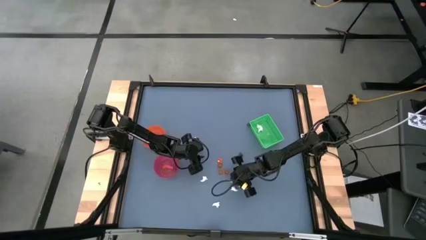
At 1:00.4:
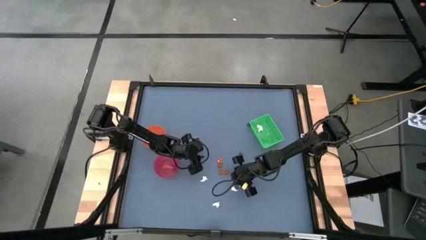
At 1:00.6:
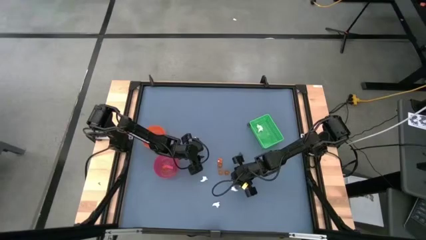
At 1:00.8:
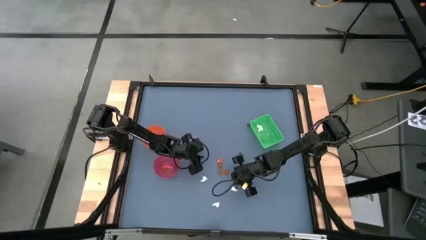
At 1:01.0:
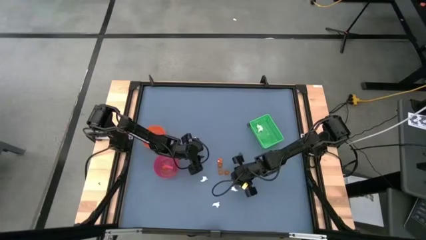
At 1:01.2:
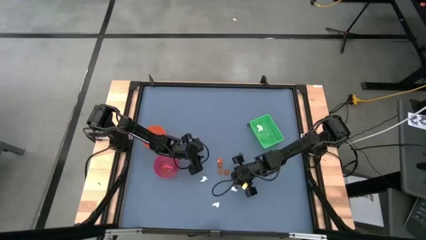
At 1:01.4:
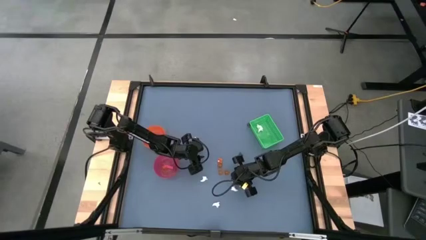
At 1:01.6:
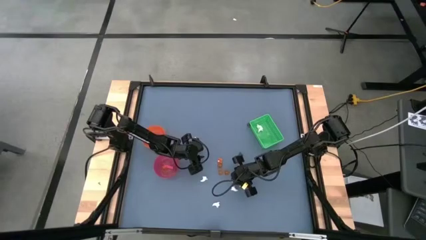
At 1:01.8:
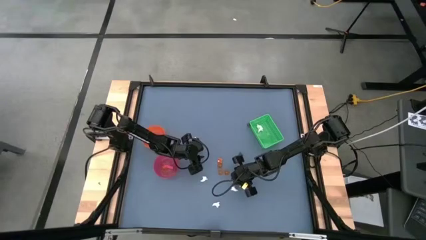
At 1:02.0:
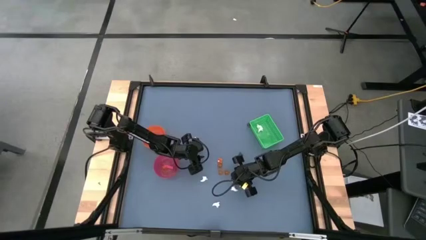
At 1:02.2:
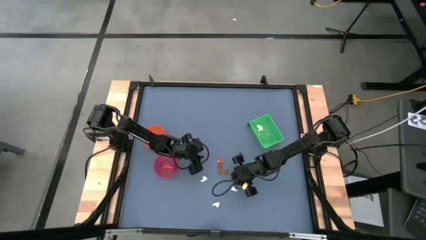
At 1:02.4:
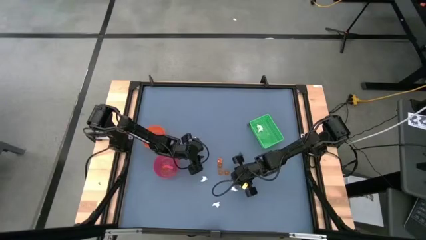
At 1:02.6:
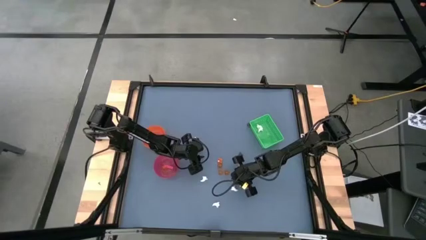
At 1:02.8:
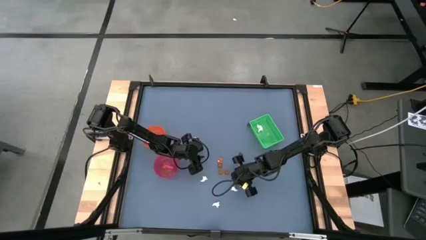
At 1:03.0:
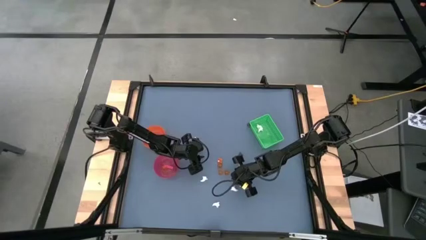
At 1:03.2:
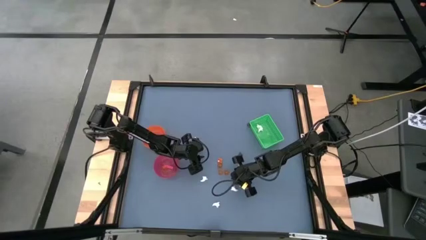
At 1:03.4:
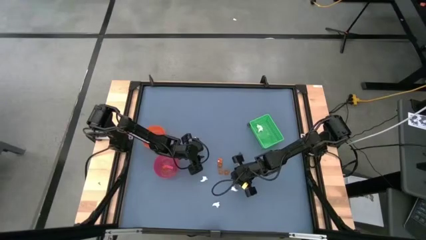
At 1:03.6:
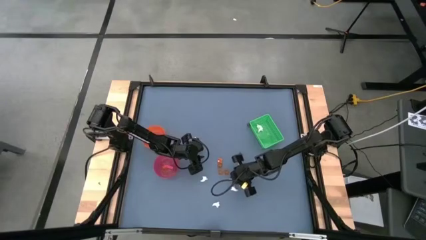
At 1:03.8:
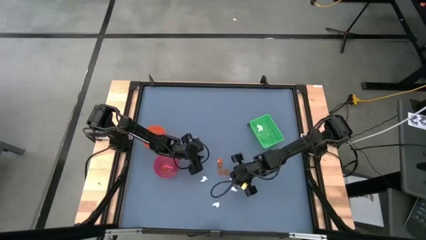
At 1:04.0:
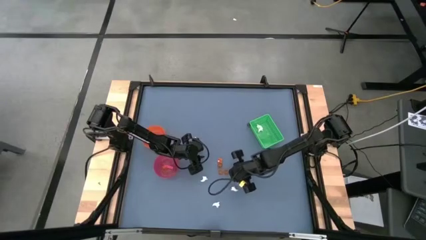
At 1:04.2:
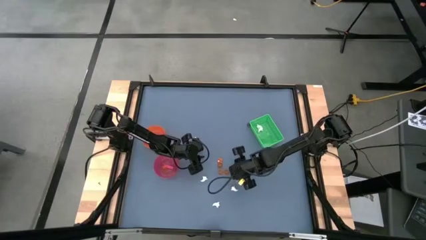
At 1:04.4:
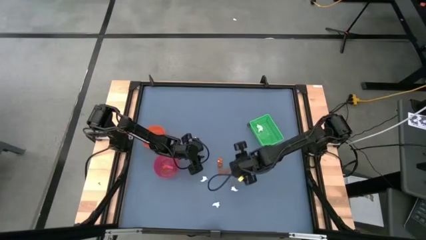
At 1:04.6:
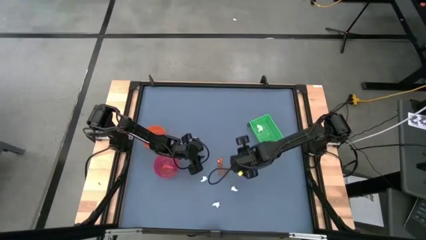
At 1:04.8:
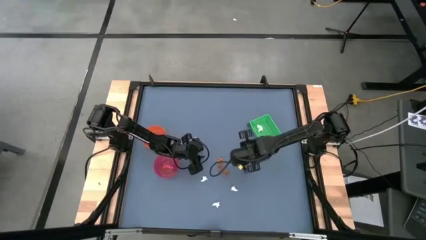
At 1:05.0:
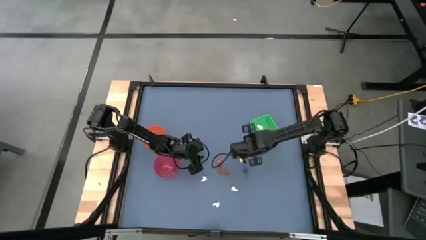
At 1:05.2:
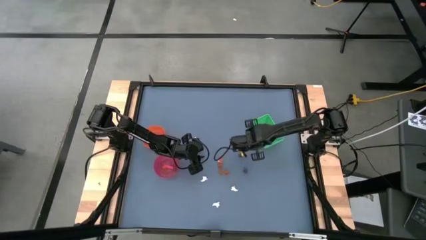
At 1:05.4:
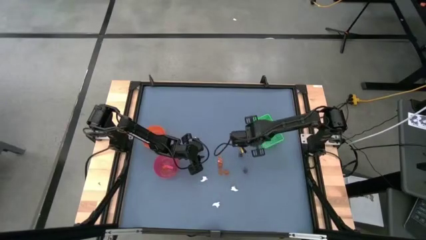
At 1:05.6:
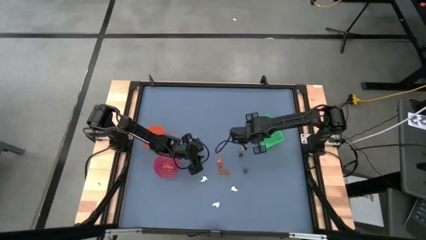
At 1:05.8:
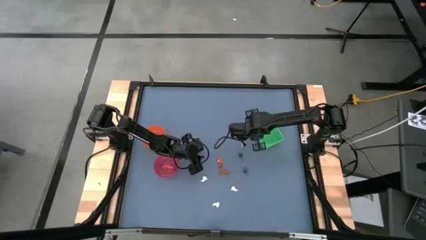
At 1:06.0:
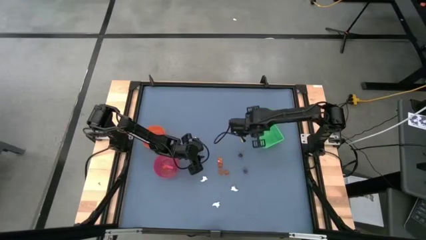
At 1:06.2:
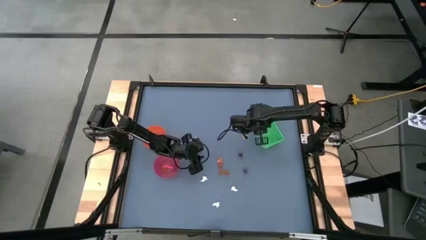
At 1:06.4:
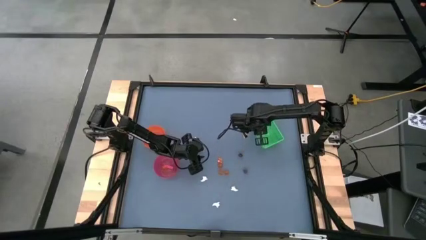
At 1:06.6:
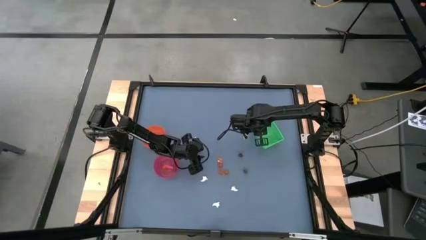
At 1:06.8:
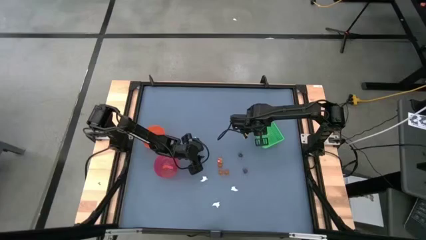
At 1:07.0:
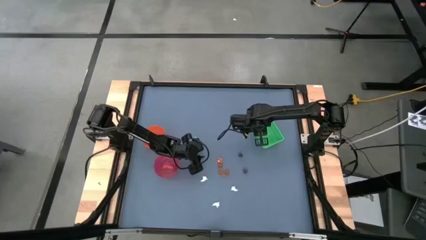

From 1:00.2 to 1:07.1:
Task: Sort Halloween decoration
Put the white ghost toy into the green bin

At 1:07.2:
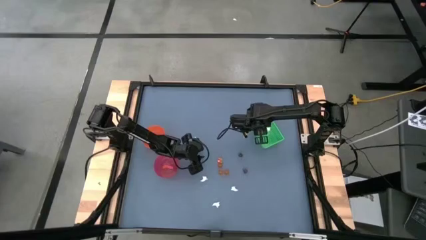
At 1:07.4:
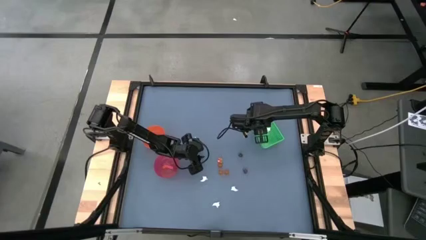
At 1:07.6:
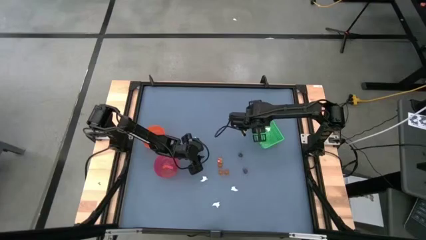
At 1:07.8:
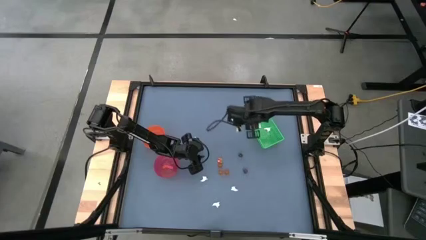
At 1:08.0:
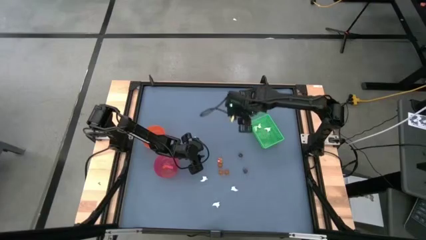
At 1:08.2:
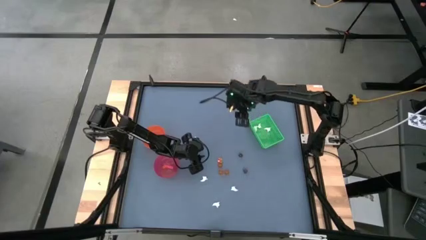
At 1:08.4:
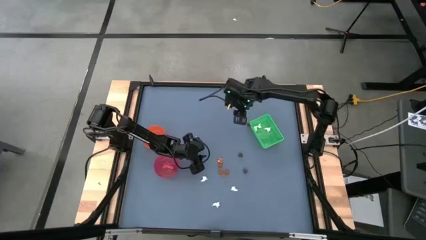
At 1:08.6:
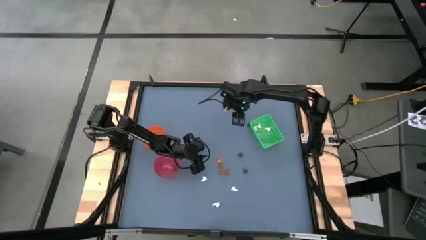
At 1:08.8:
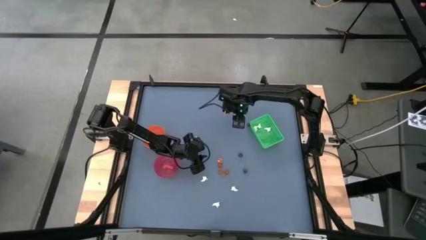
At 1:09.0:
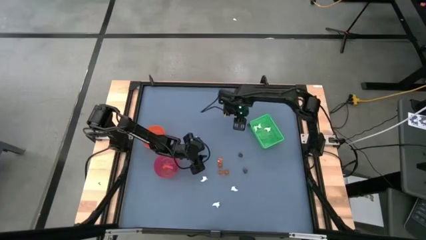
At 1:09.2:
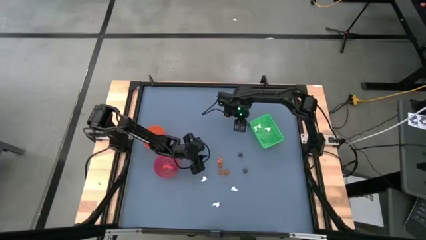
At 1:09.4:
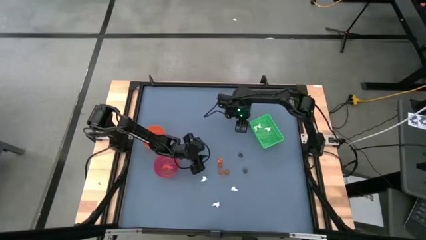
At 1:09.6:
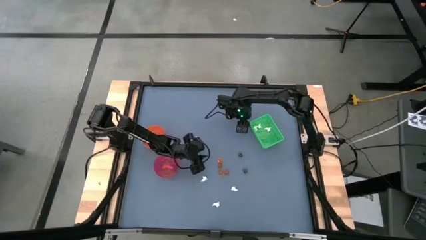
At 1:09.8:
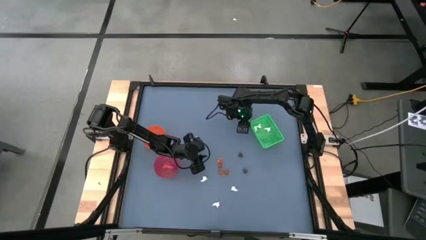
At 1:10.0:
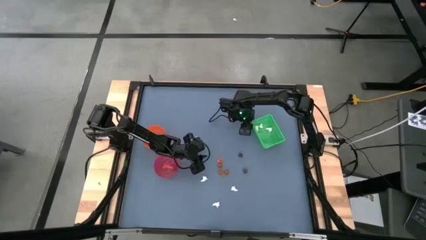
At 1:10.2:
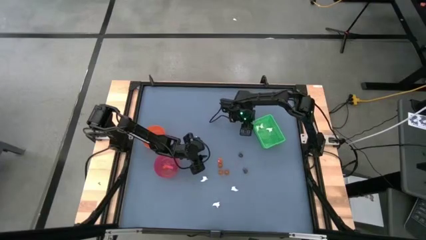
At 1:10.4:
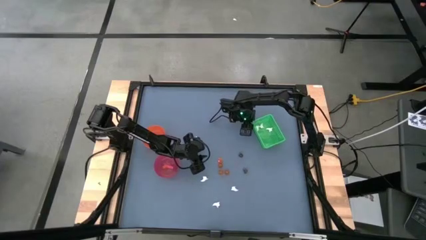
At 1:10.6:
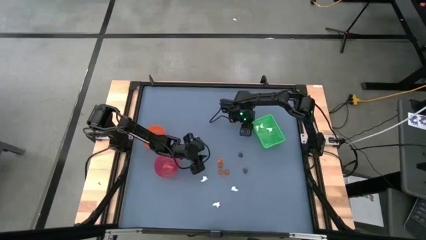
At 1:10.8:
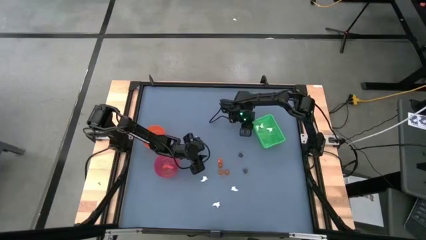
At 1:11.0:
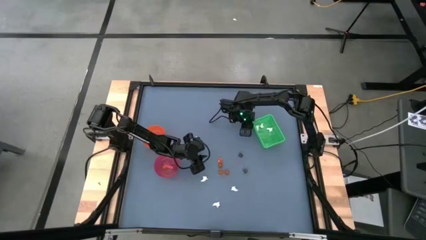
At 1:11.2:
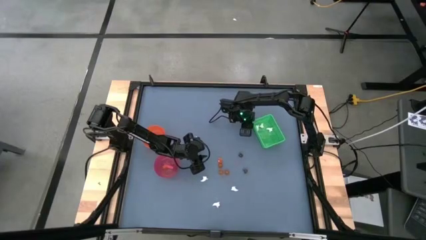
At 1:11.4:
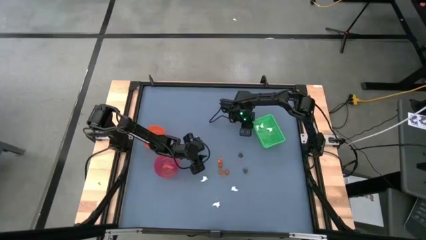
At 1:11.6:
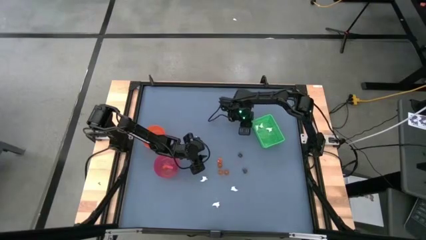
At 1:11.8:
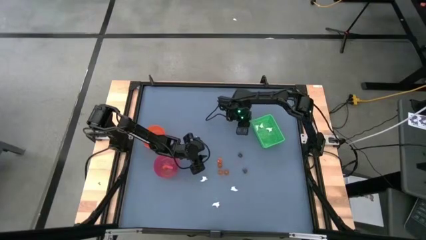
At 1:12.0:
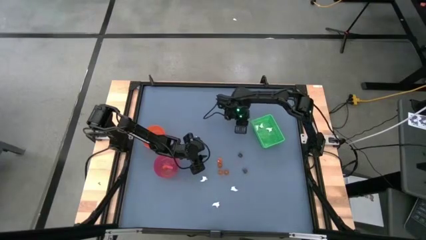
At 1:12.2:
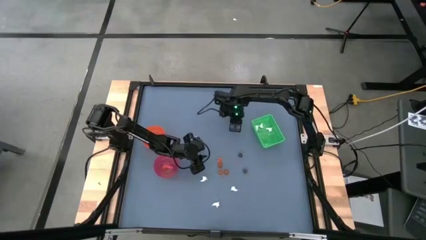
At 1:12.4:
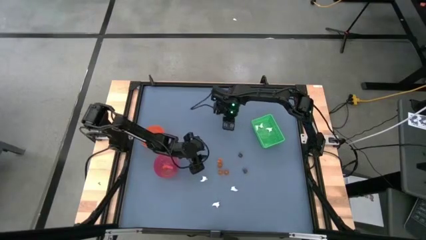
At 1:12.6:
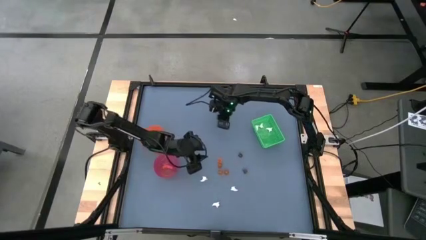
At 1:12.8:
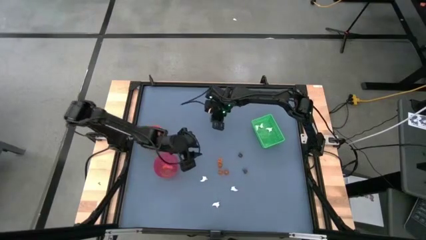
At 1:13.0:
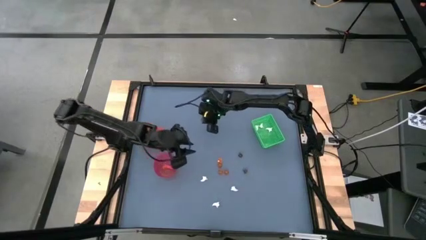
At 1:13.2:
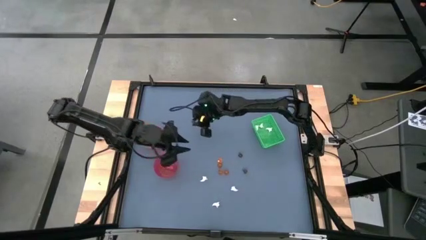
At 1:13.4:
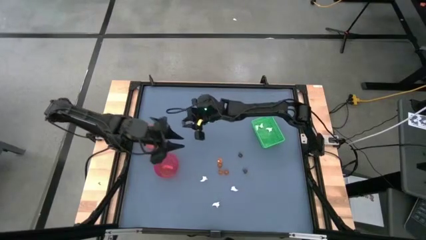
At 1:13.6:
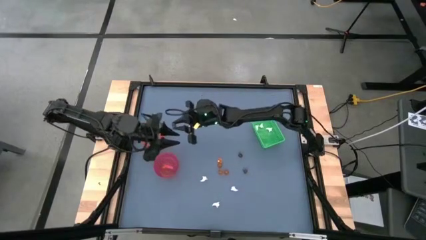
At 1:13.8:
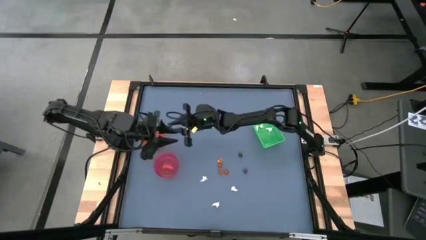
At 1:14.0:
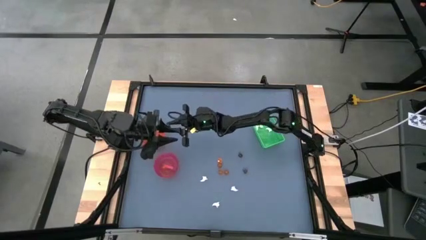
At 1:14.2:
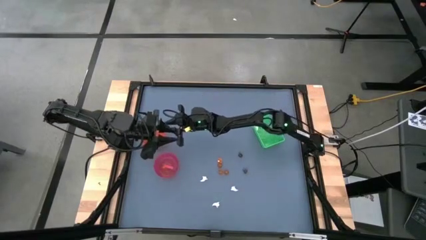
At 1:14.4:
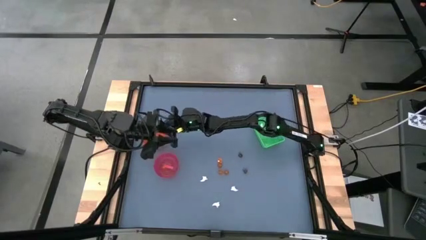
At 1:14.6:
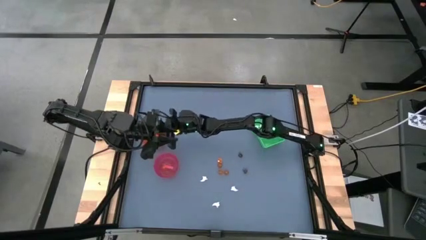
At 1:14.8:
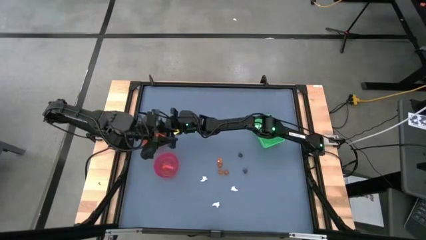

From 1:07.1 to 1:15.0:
Put the black skull toy into the orange bowl
